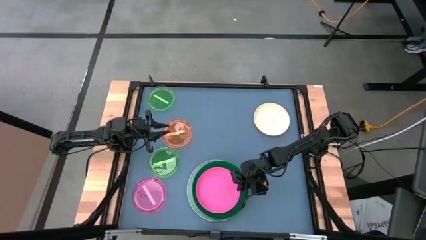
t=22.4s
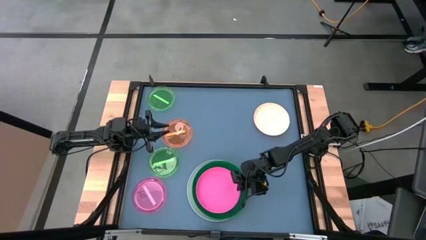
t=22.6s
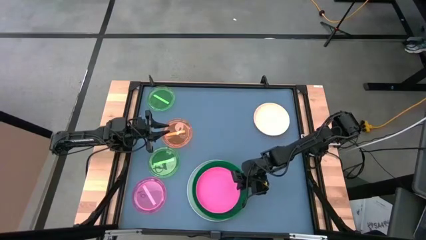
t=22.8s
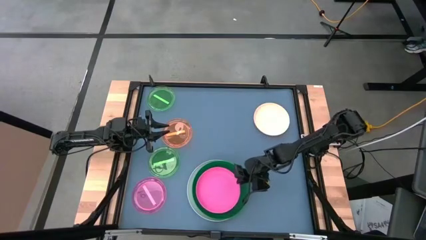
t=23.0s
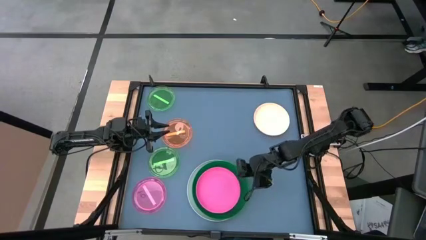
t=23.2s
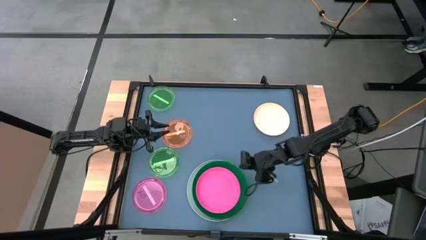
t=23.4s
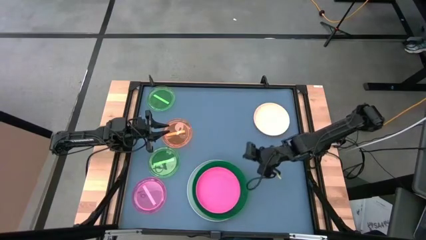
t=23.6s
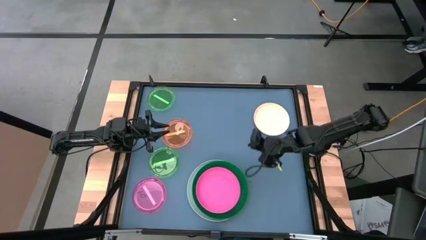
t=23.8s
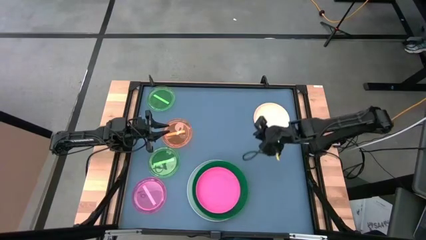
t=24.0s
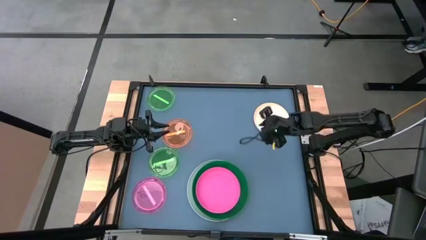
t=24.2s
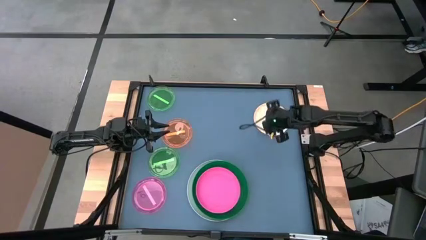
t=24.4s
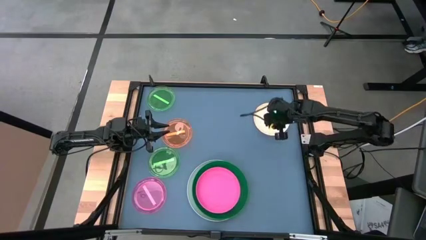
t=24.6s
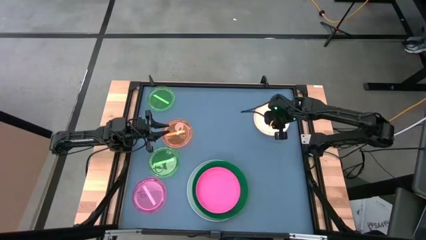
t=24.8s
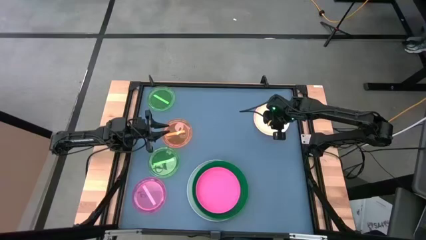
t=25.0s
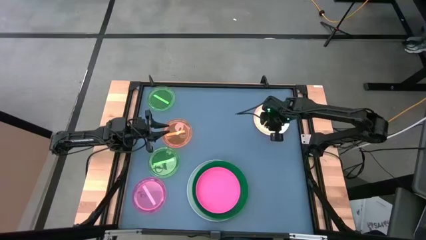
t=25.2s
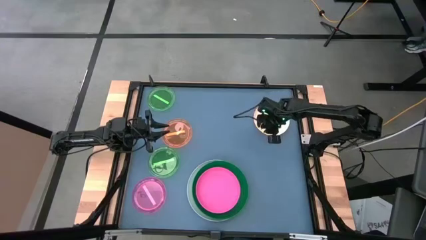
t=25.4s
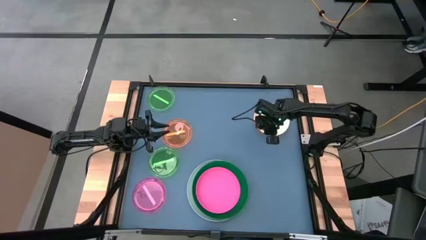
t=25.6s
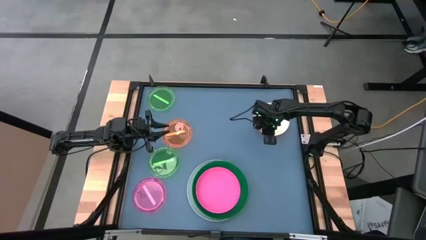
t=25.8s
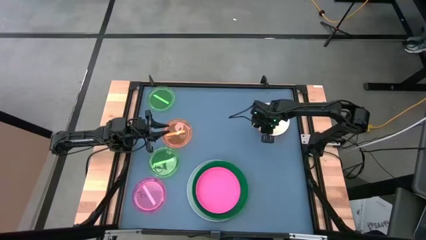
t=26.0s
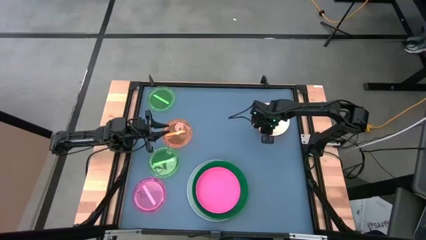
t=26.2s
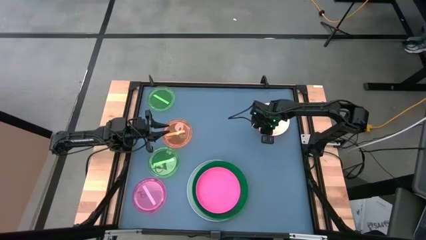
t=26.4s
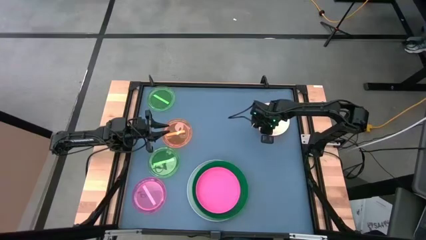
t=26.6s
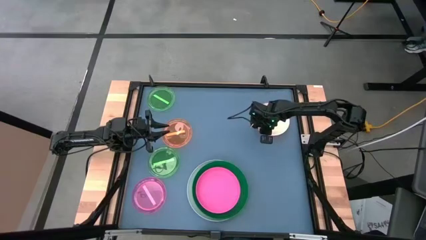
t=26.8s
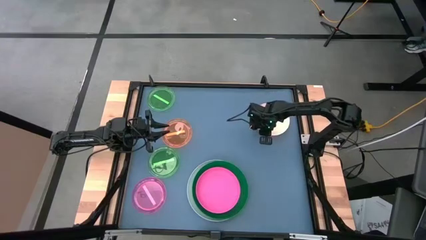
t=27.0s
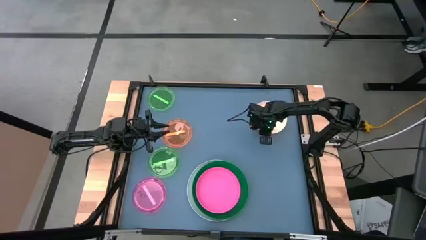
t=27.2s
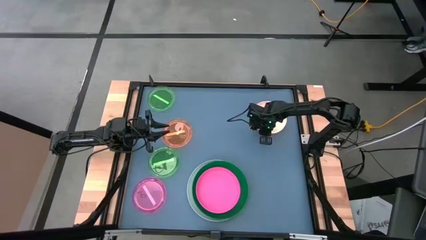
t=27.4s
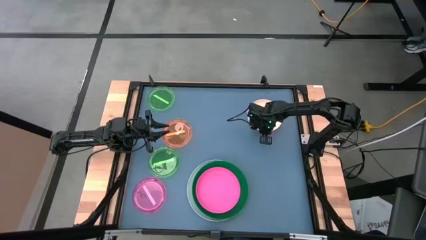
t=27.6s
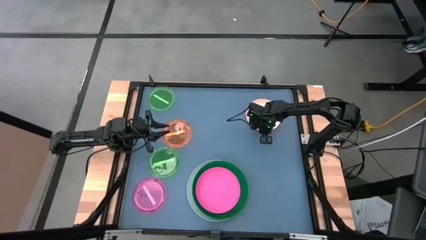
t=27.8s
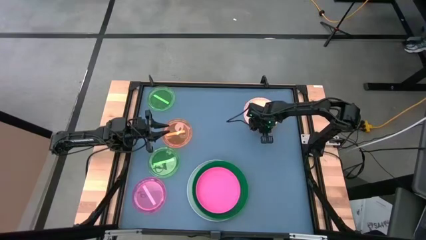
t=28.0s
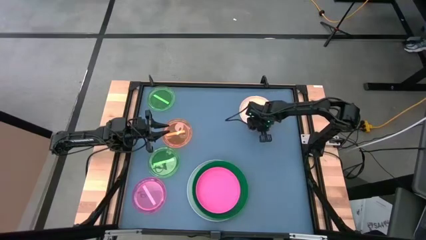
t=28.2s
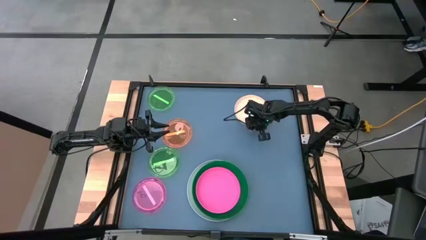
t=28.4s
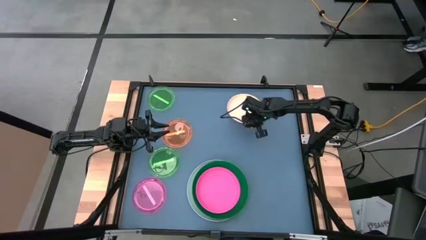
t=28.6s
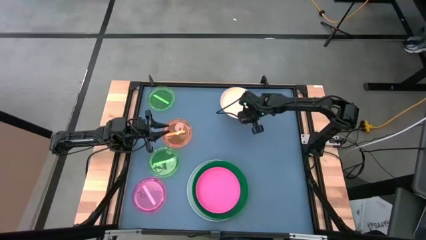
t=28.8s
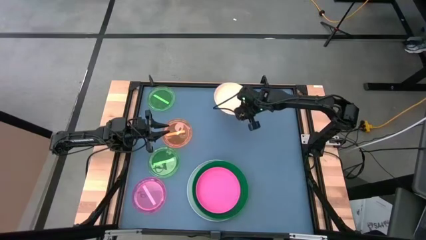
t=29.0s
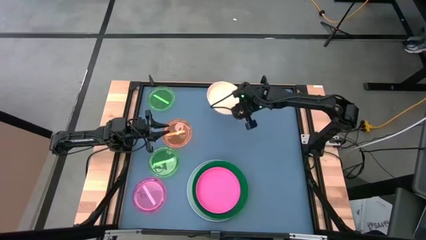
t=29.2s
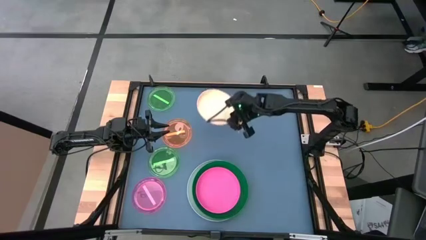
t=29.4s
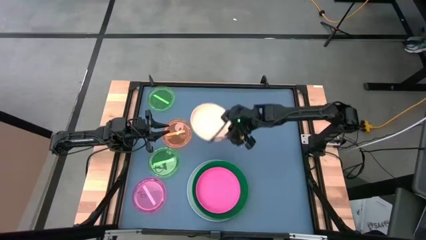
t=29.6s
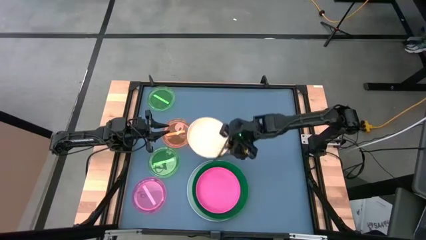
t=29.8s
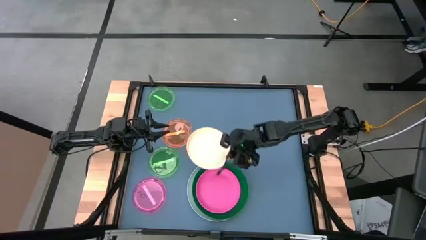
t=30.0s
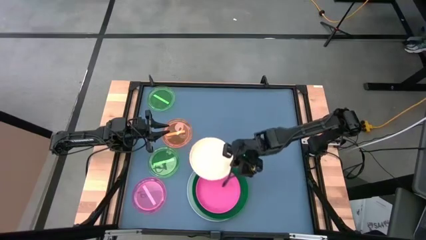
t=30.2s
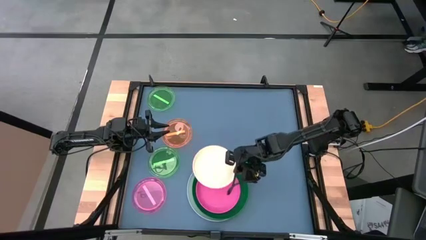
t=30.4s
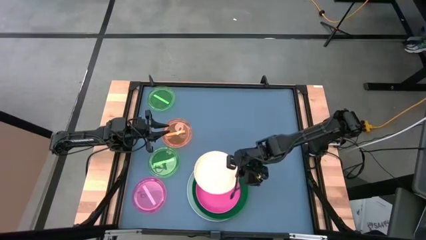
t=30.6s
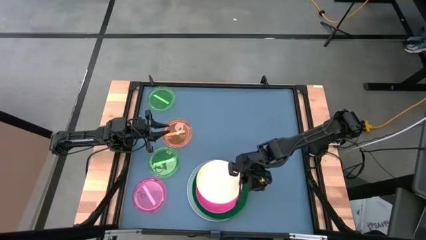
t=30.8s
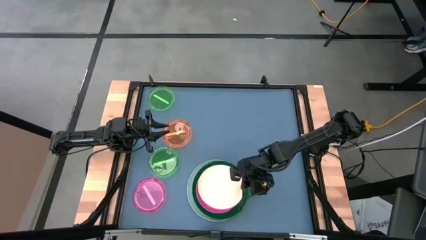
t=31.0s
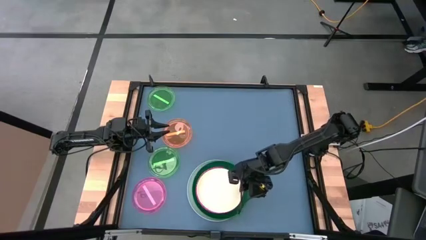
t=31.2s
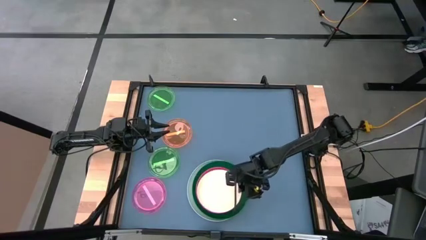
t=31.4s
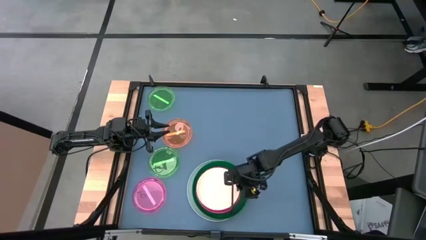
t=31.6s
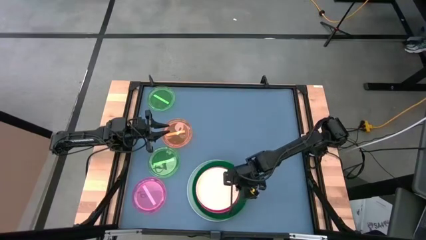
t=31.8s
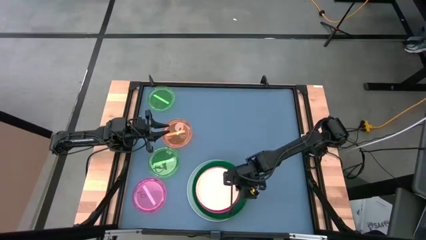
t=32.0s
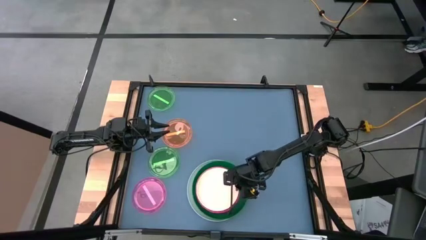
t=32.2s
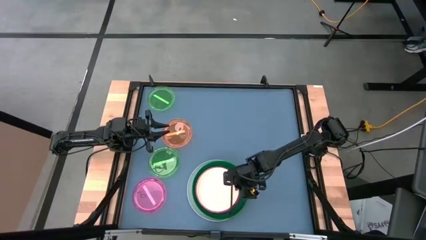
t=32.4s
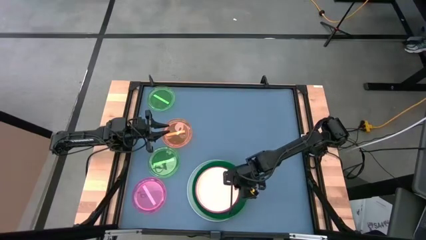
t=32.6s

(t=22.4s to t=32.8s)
Task: Stack plastic plates
Stack the white plate on the pink plate
